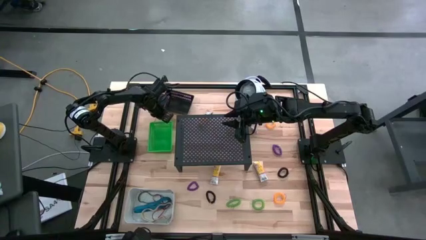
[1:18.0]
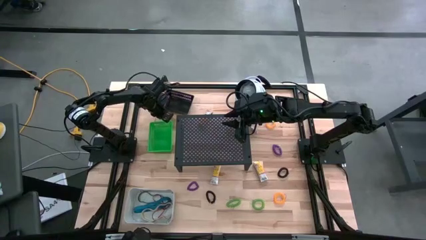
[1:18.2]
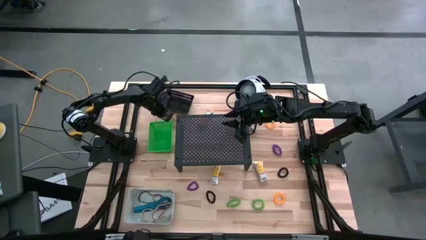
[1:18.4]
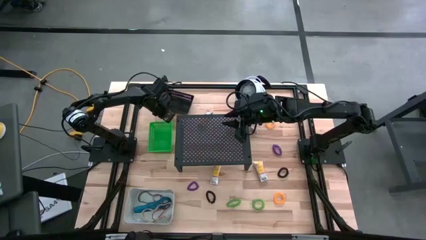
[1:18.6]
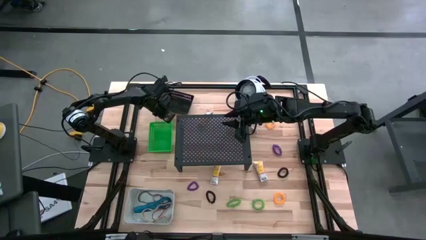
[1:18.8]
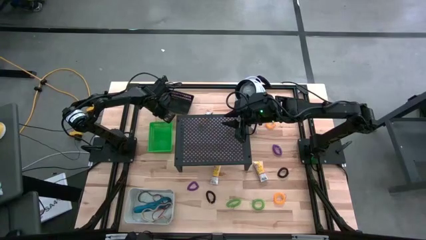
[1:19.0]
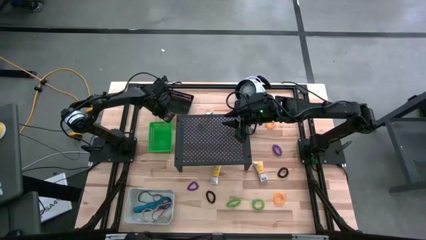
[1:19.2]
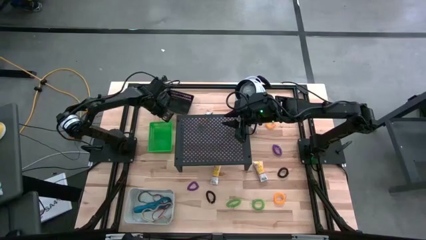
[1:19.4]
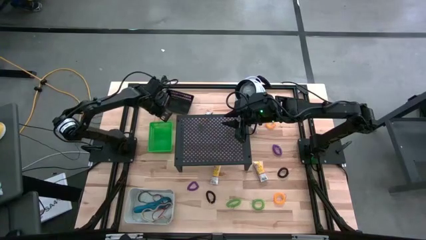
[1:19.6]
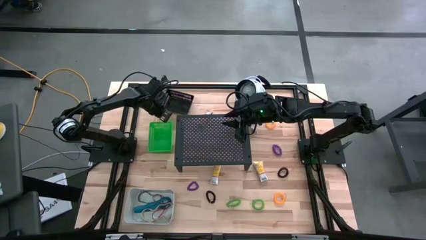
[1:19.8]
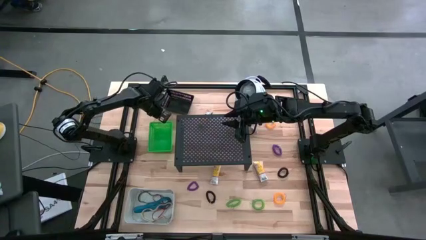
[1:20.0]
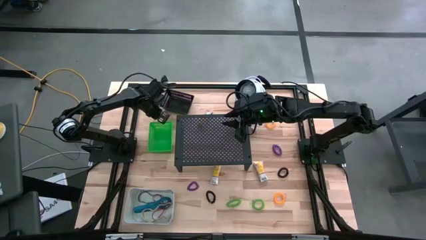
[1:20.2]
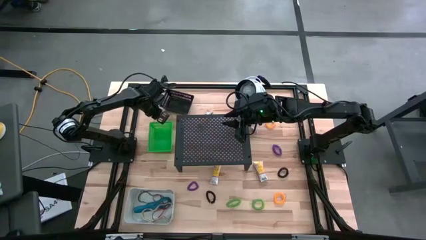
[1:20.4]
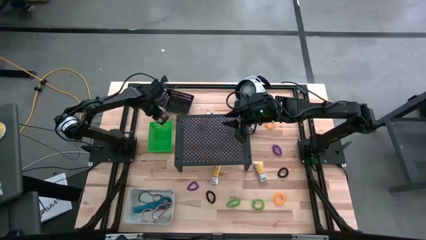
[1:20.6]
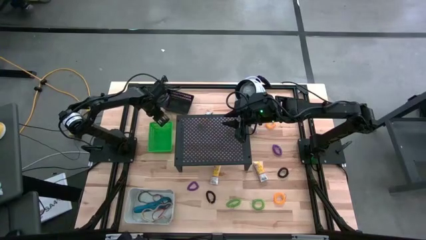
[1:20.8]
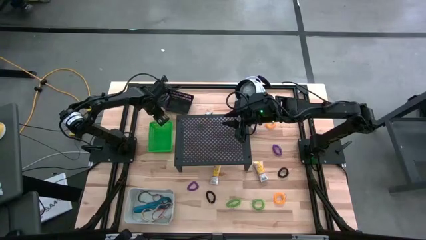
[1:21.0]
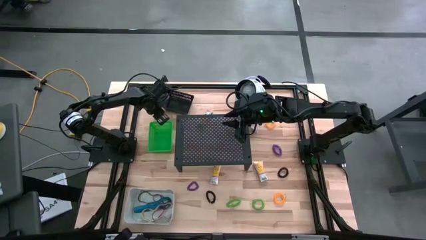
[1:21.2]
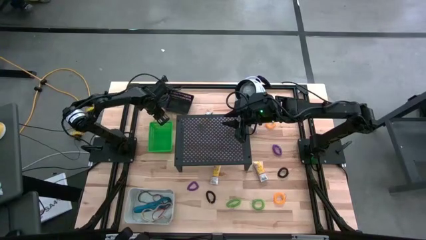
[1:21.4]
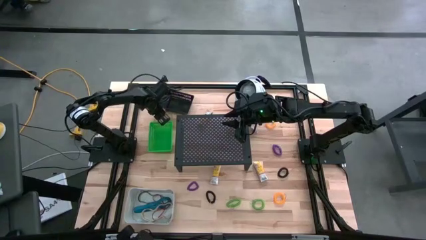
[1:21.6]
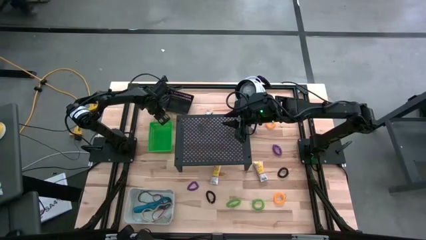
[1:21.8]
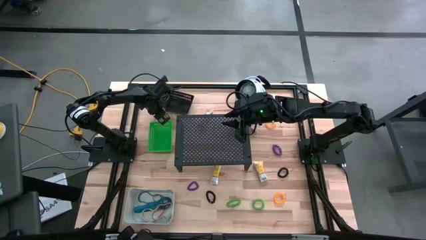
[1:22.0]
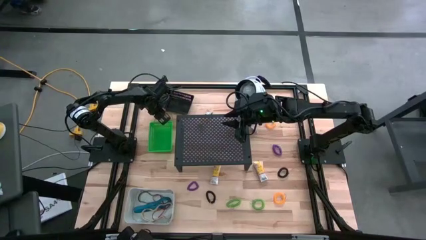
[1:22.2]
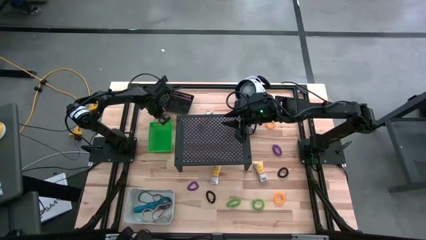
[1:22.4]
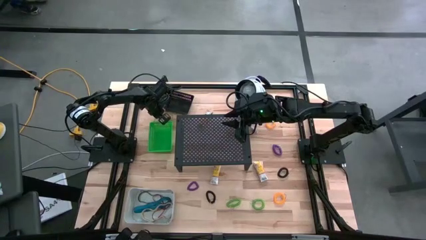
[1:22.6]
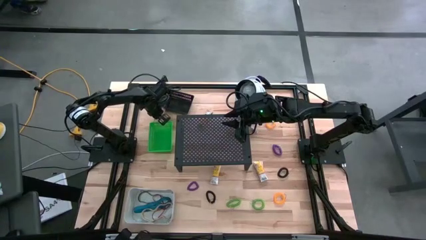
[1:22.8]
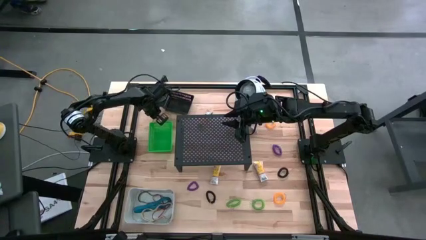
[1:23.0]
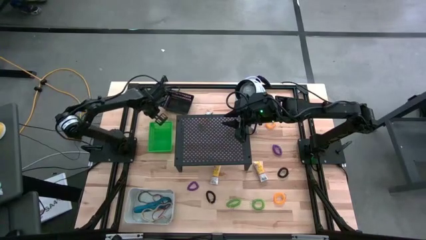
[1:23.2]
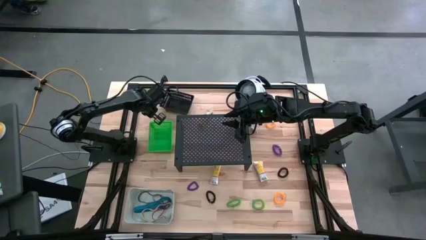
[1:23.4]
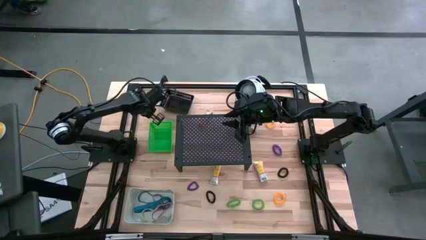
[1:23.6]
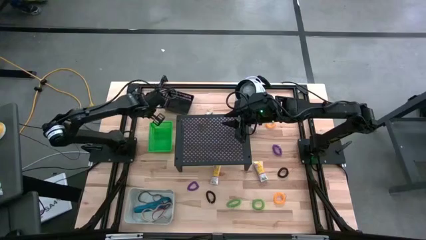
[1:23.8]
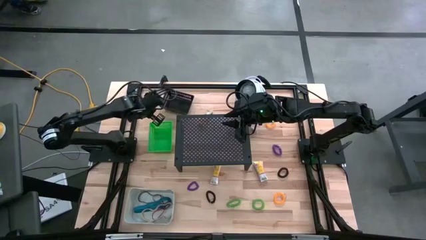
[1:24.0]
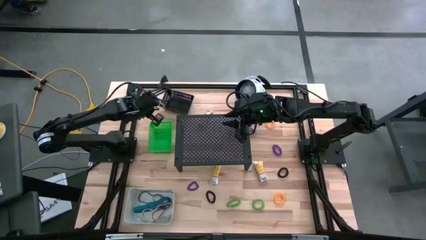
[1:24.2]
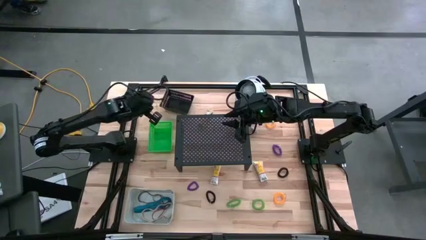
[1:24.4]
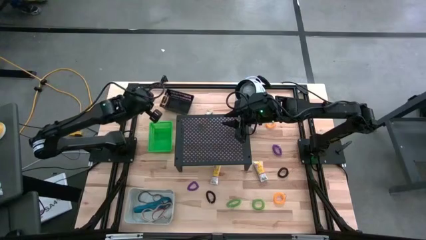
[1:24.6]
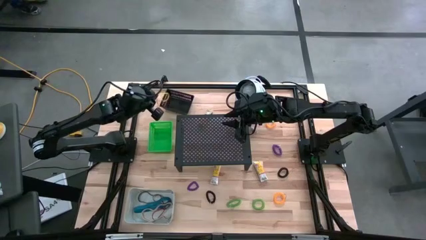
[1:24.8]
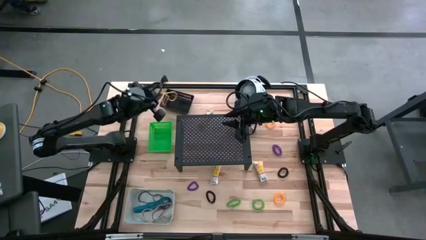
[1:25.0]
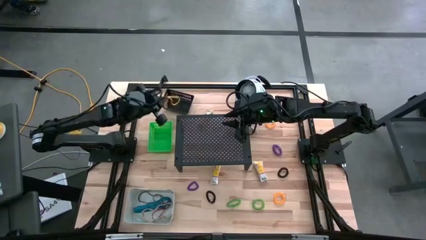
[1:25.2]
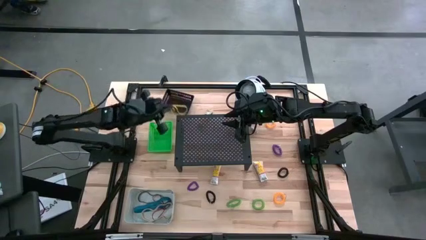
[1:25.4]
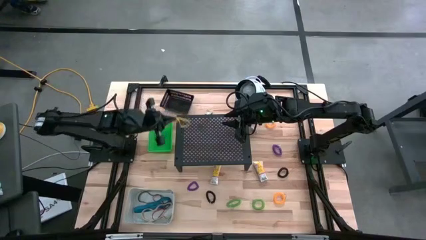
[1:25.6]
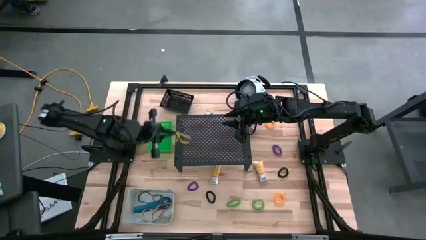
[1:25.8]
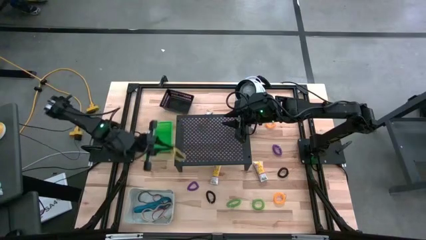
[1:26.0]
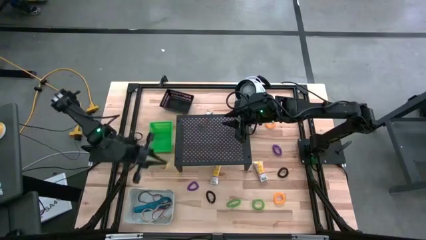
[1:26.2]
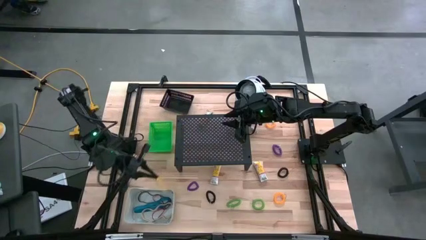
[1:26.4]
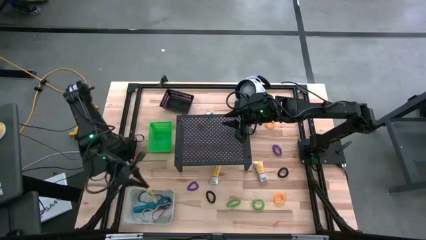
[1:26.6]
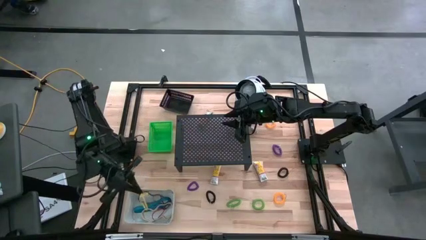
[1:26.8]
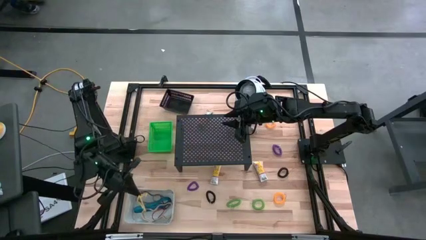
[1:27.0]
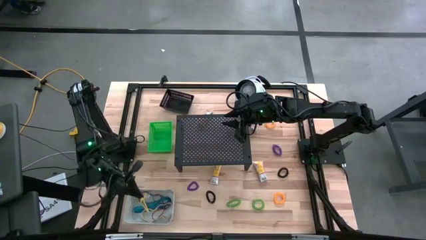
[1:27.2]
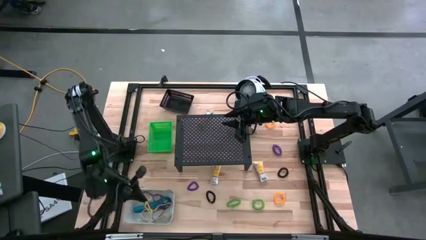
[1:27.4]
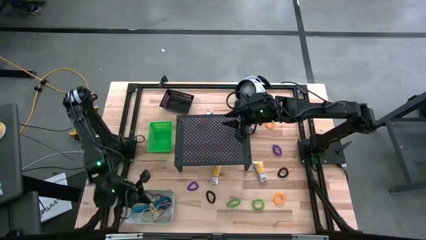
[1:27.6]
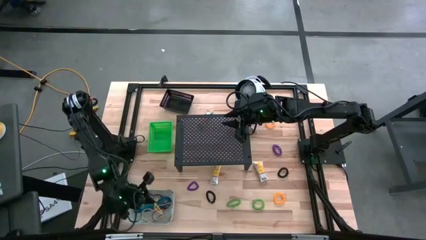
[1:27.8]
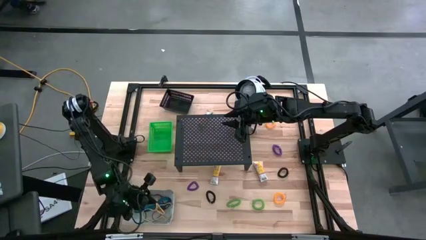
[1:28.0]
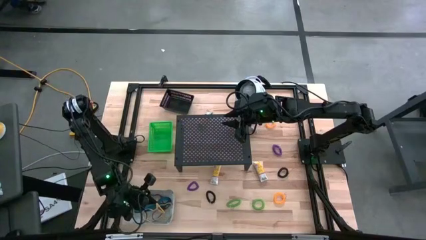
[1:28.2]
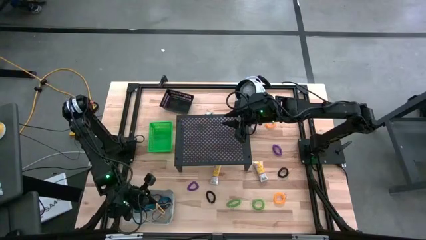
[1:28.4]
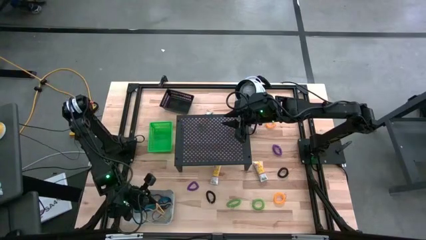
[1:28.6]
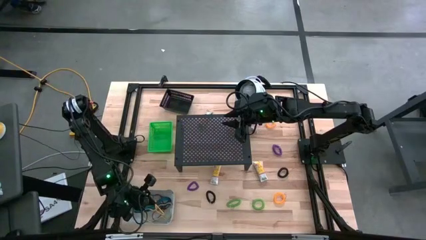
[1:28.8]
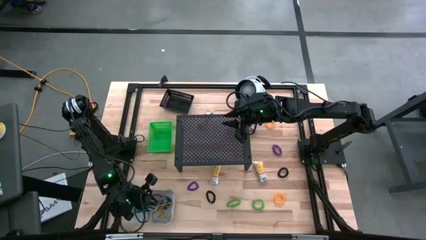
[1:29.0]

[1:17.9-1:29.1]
Task: Pick & Place Office Desk Supplies
Put the yellow rubber band into the white bin

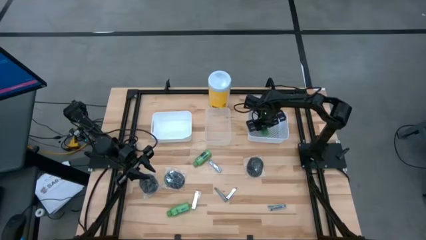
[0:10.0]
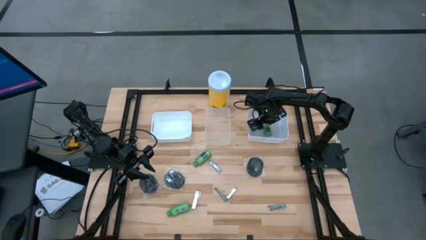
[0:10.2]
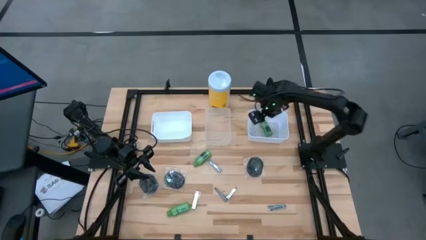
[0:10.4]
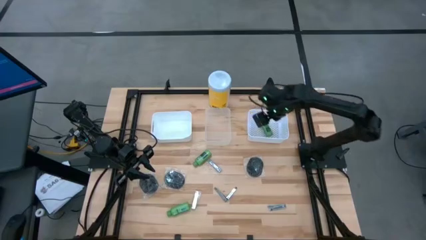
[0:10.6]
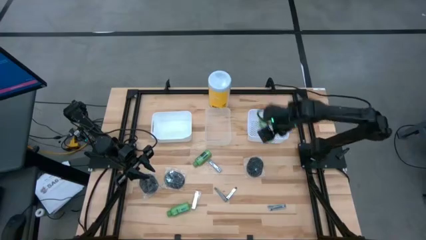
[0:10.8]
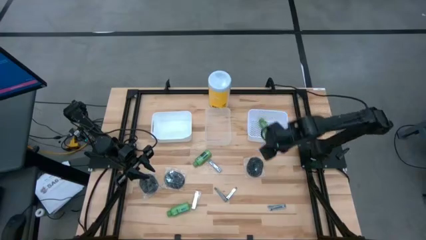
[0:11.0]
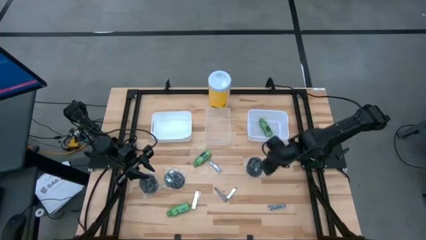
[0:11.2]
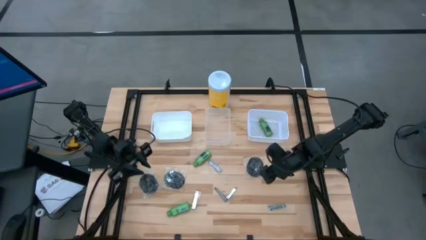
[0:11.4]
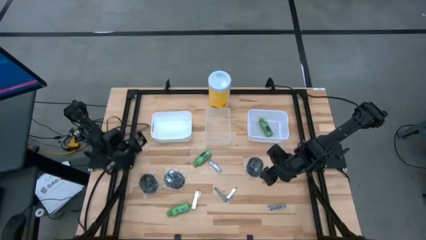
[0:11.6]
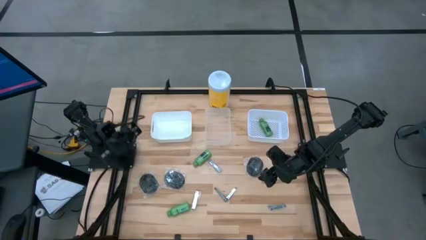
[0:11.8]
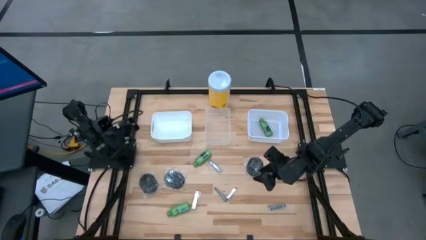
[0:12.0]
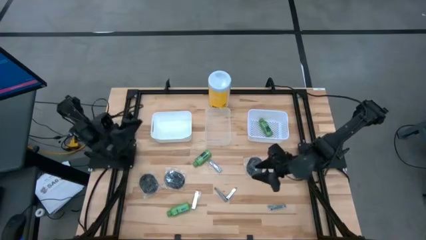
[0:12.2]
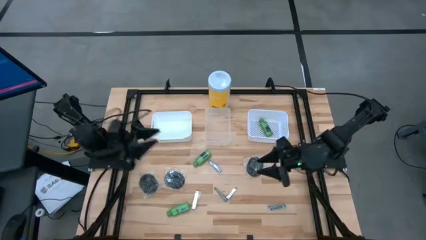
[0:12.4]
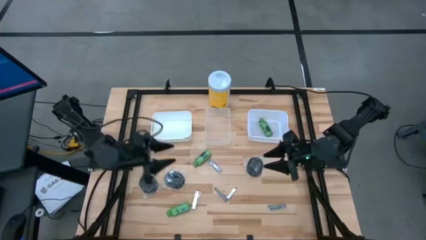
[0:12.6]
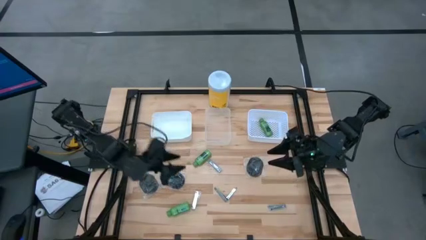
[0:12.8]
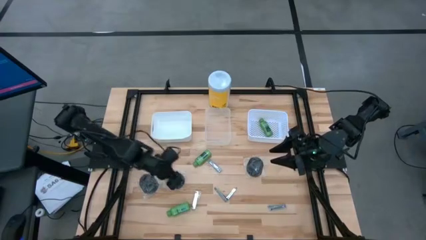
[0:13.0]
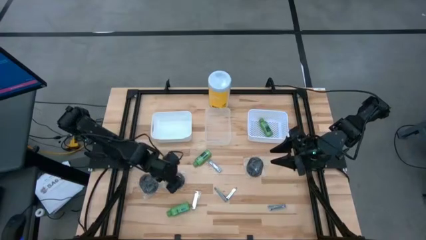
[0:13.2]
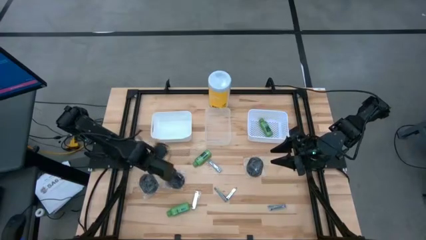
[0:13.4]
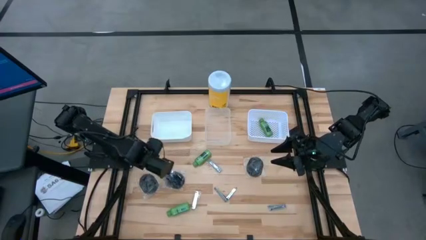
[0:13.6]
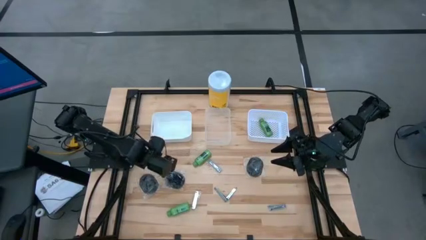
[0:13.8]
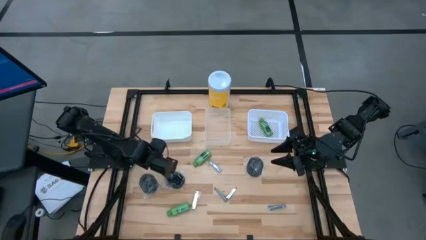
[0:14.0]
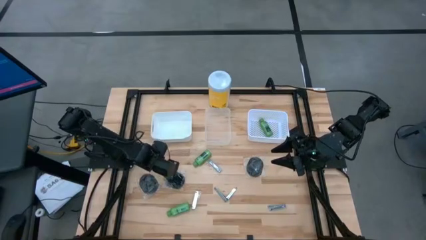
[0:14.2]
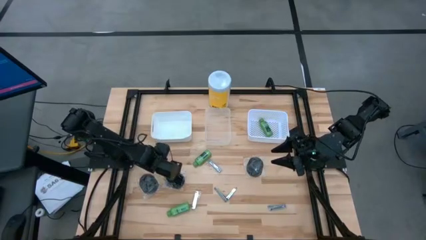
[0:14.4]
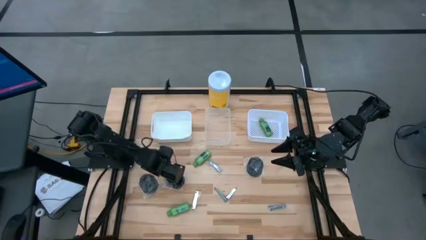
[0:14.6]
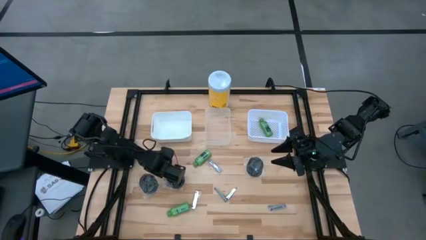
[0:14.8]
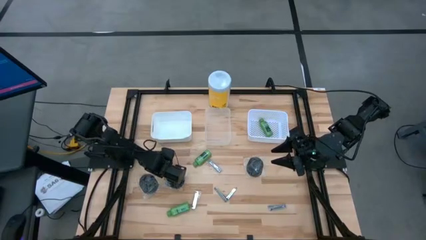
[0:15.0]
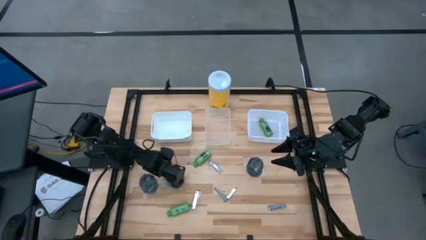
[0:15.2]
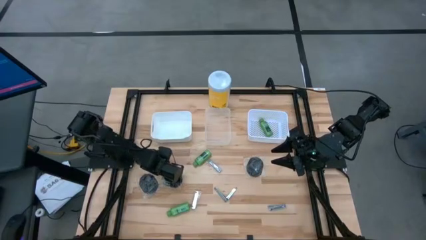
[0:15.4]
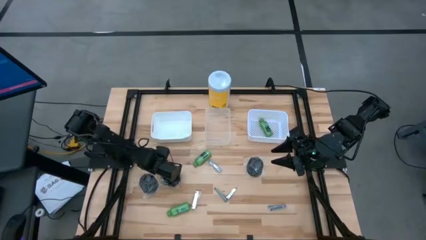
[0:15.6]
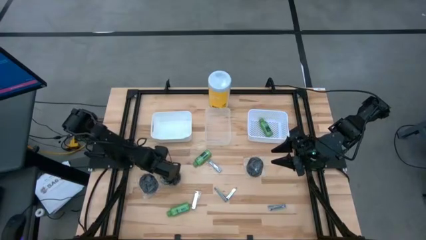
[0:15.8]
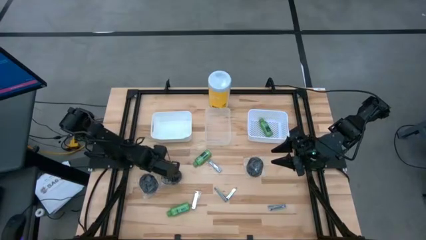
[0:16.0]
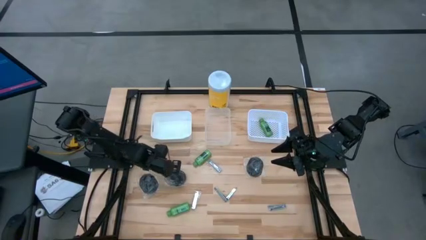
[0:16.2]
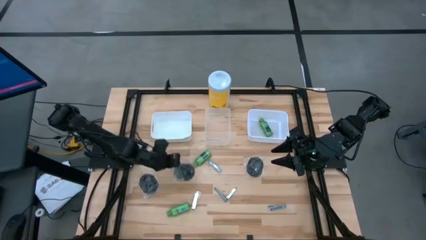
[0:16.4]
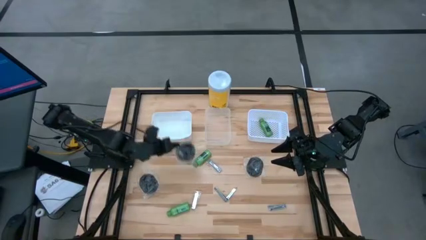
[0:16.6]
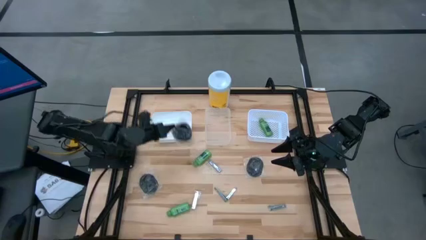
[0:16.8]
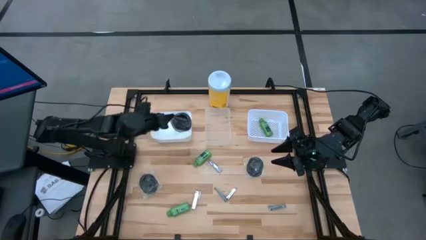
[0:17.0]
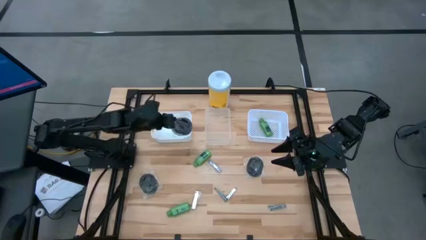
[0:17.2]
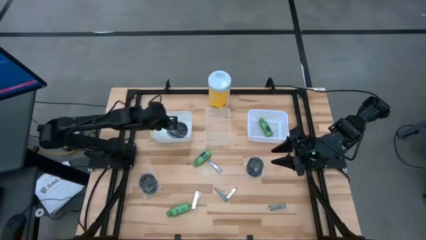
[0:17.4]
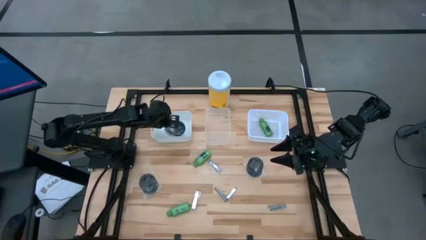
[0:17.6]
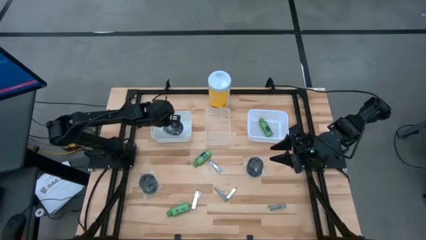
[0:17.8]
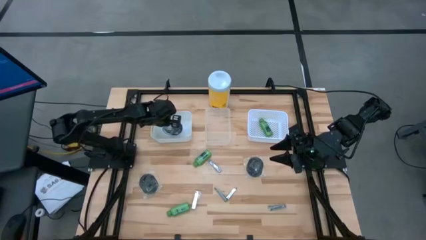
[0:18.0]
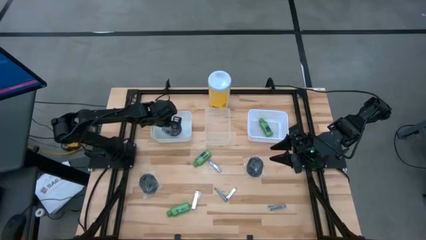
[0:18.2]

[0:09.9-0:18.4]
Task: Pick & Place Travel size toiletries
Put the black hairbrush into the left white bin
